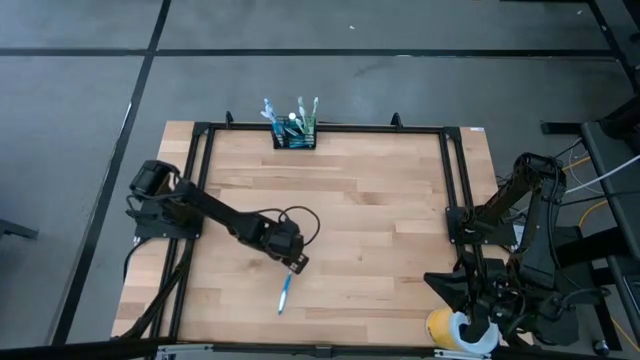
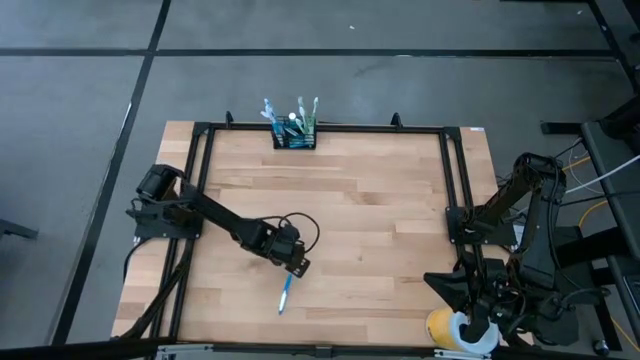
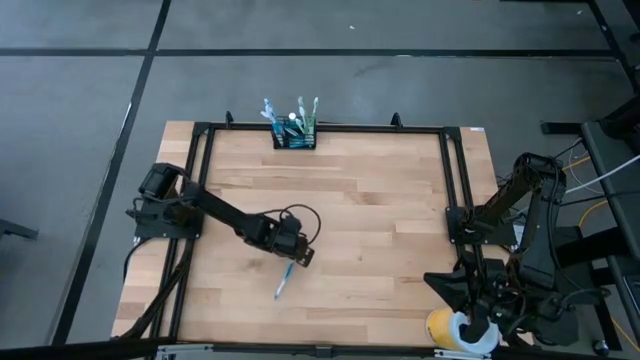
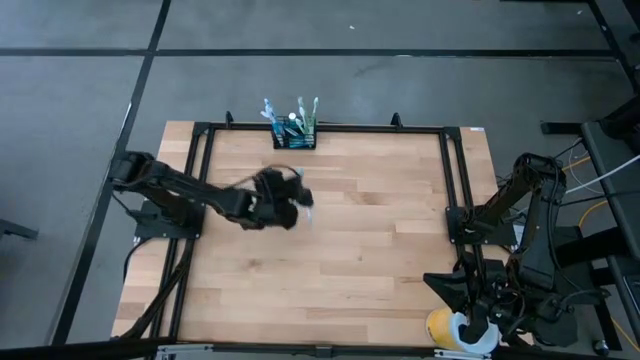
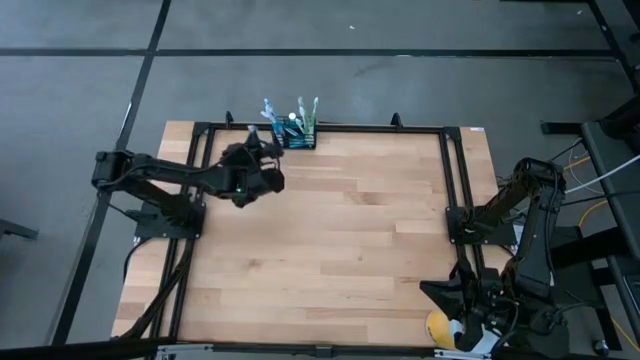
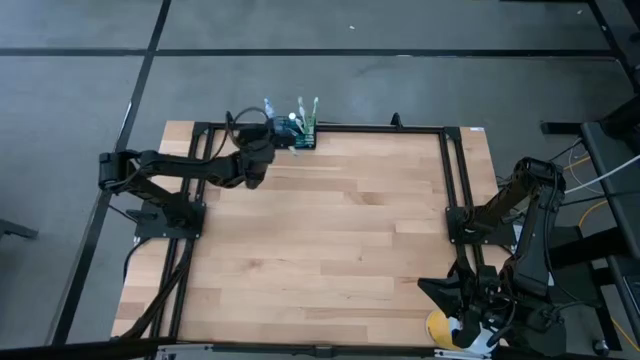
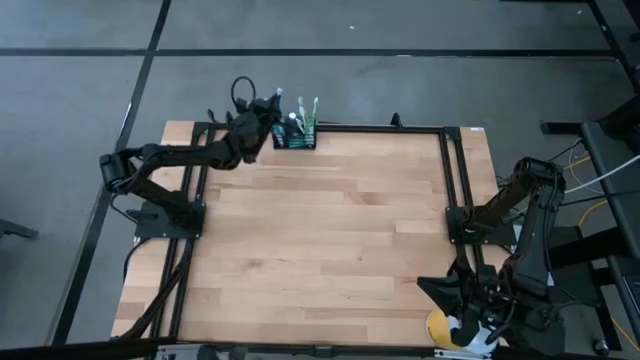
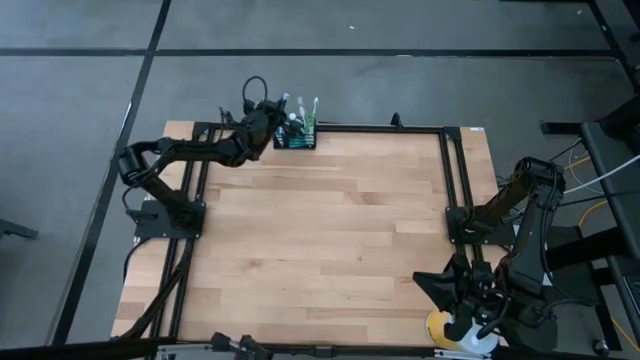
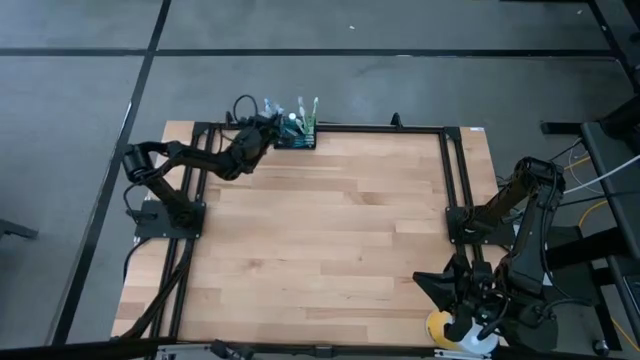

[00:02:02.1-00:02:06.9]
Task: Pick & Place toothbrushing station
Put the blue toothbrush into the black wire organizer

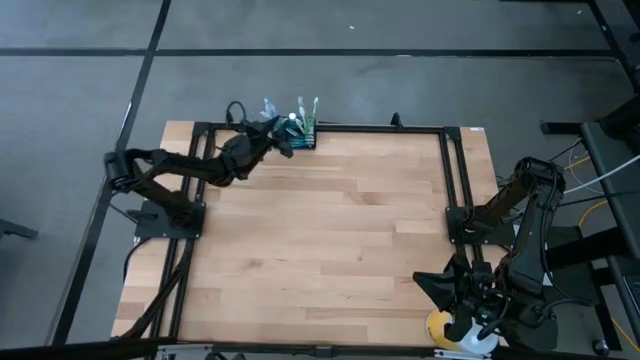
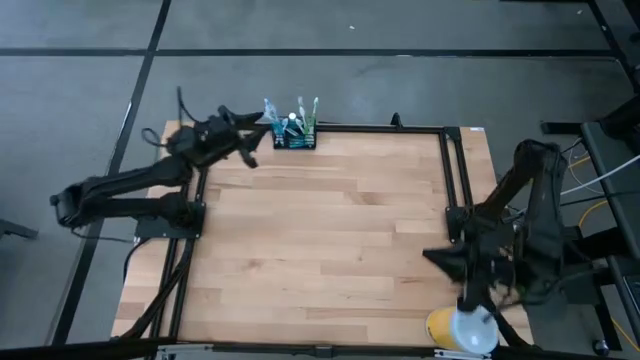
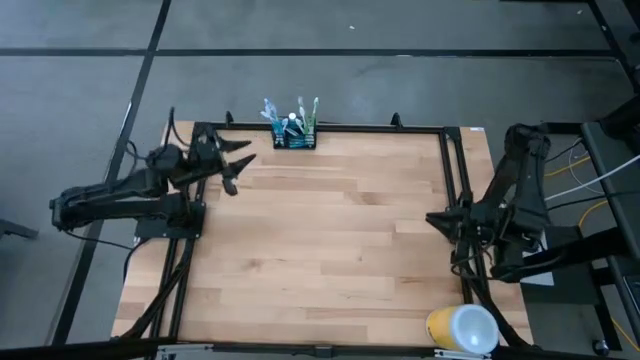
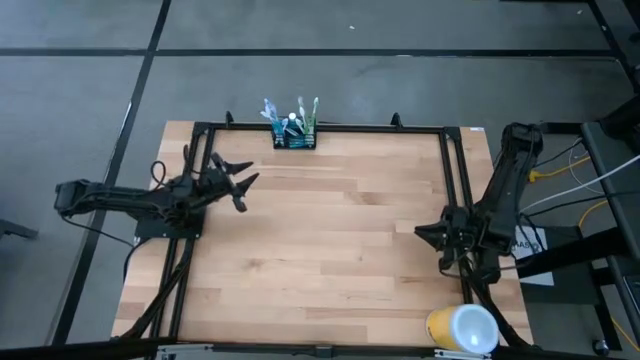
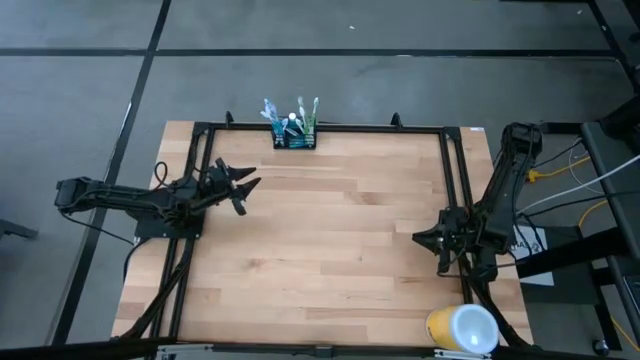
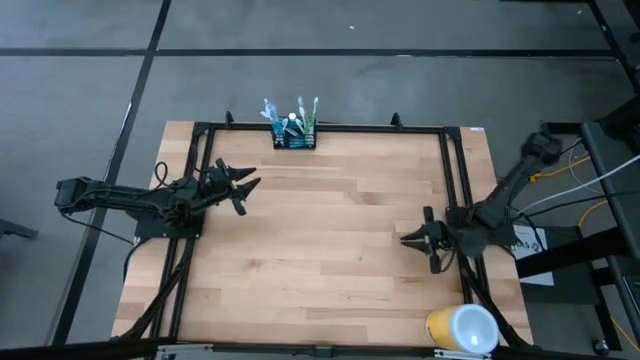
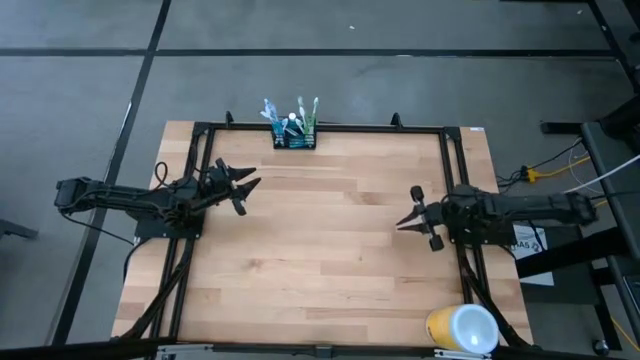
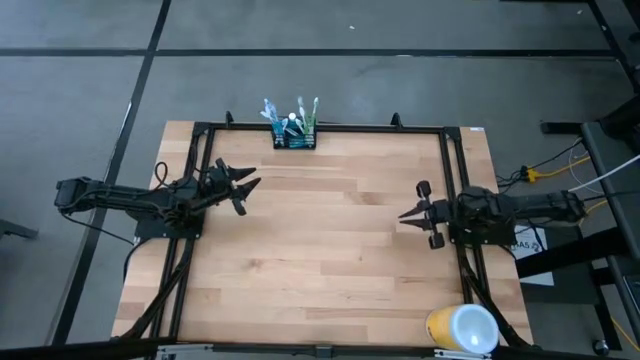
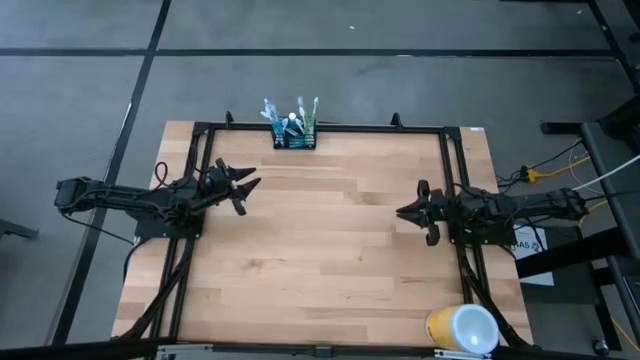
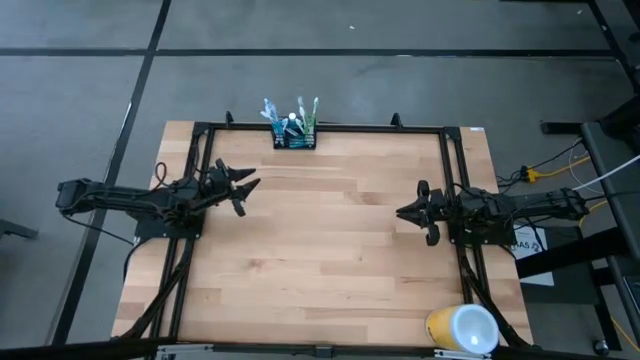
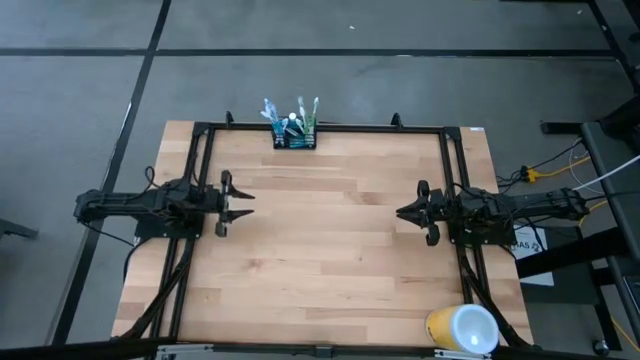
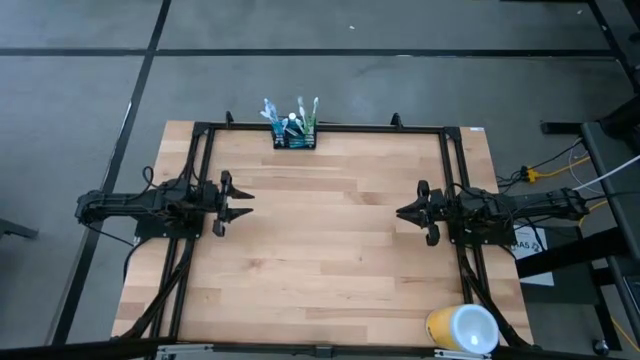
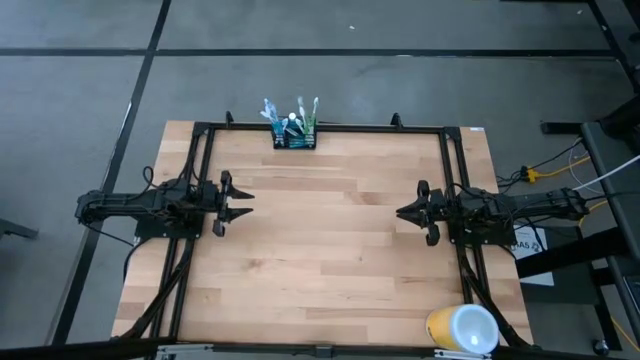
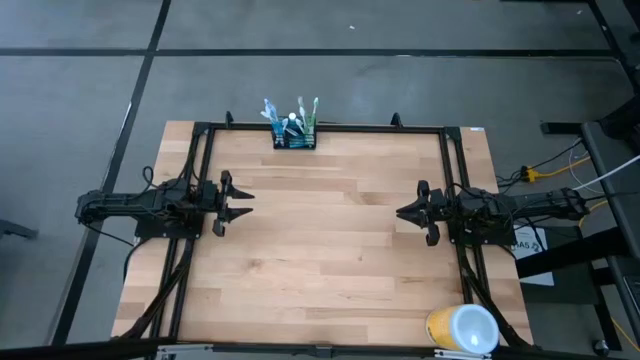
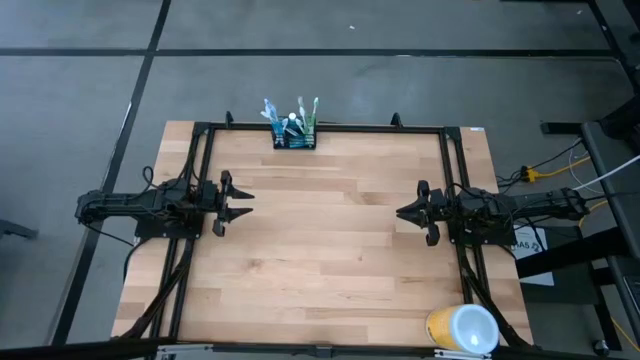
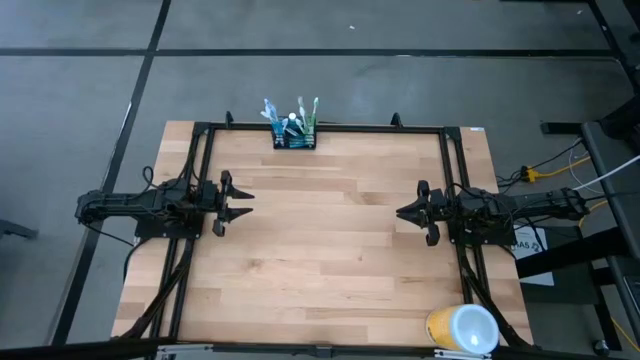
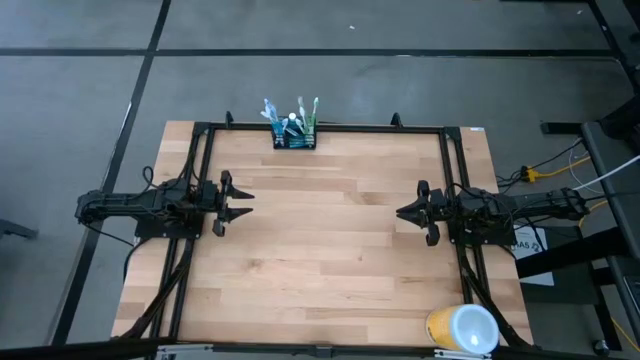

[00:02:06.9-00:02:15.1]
Return to Home Position

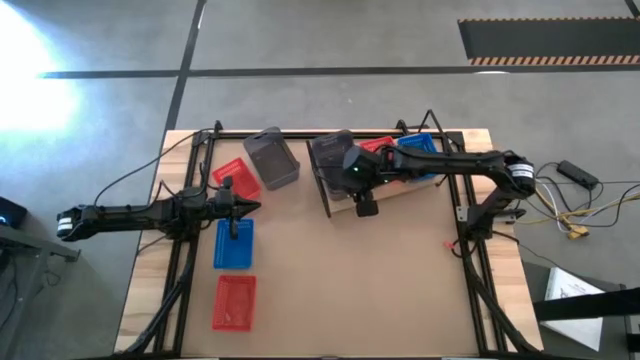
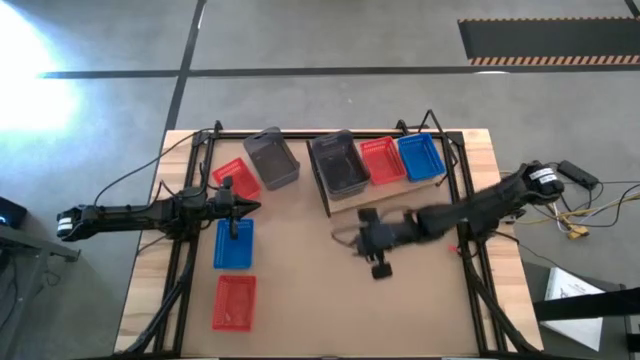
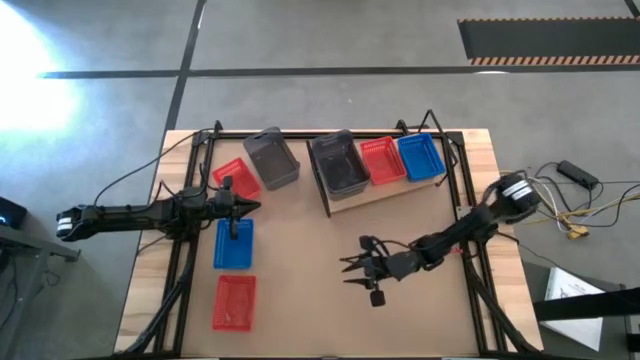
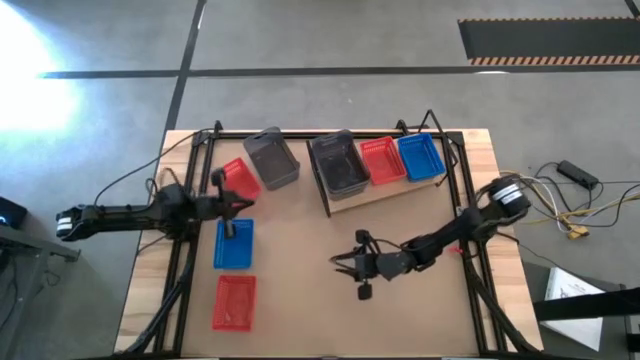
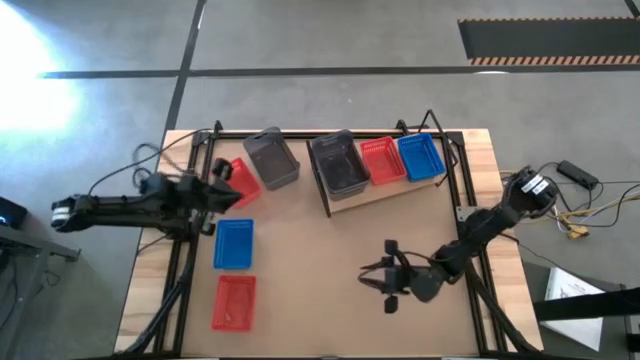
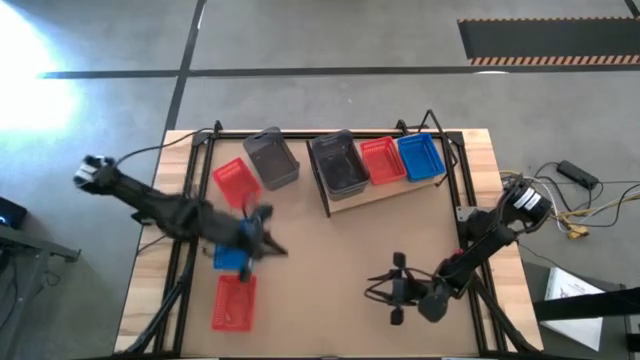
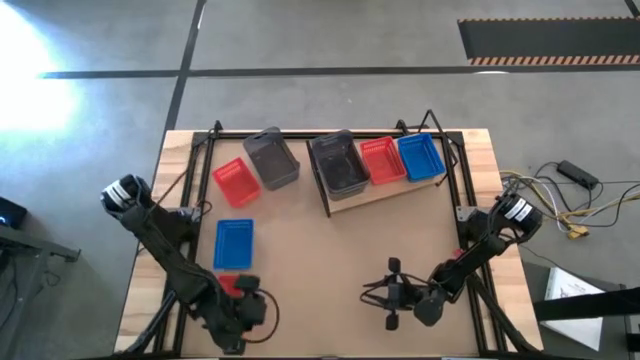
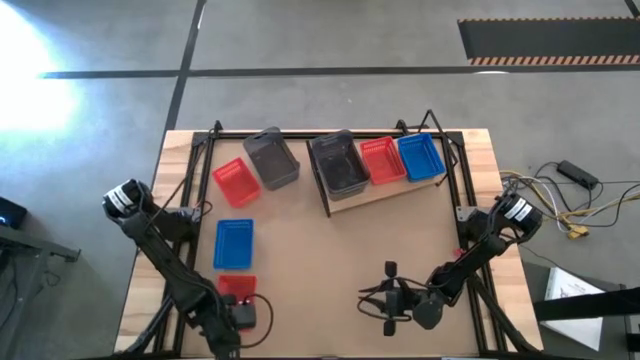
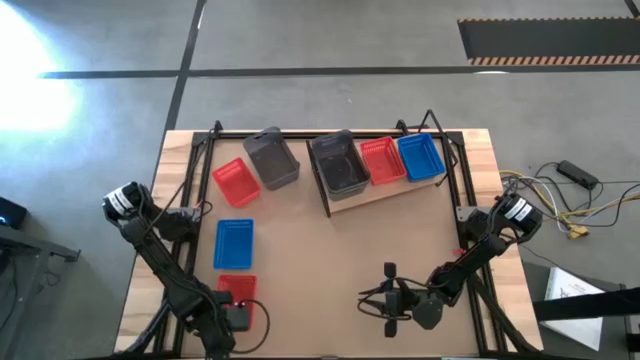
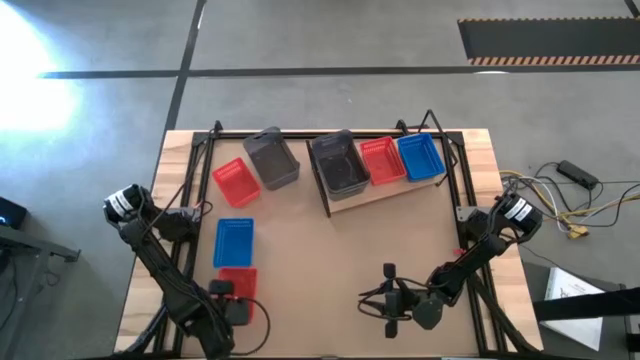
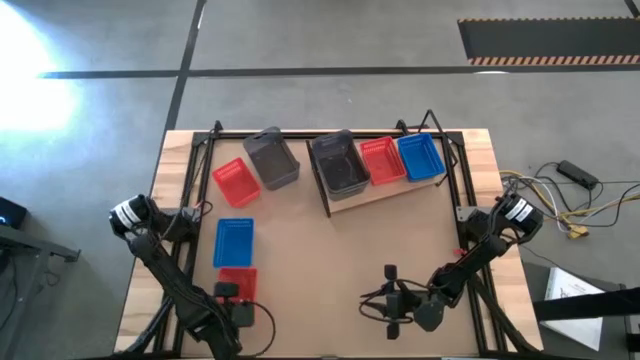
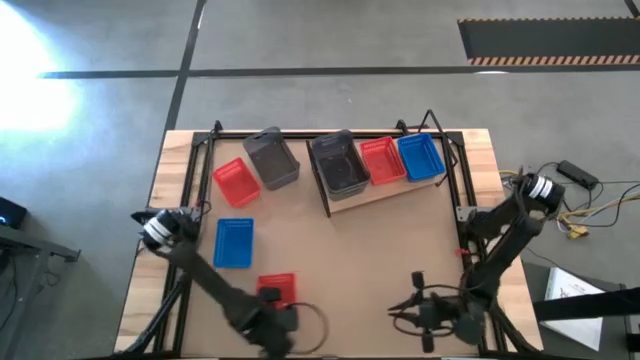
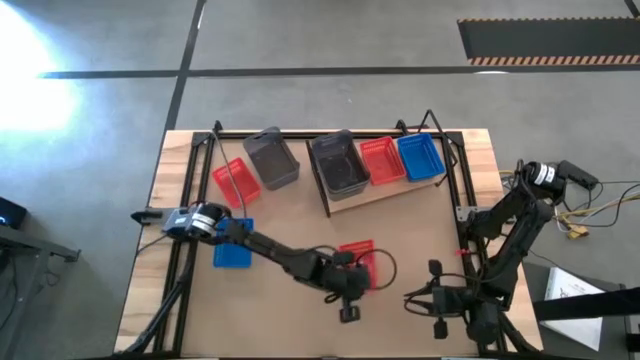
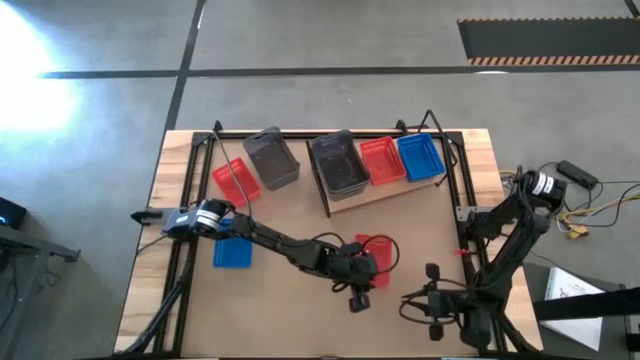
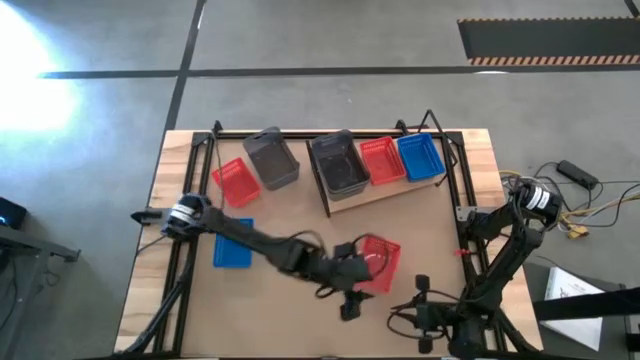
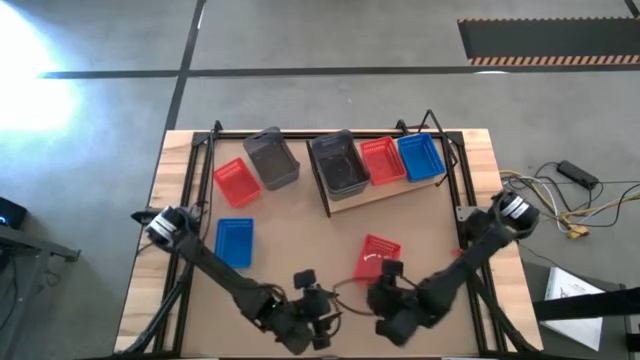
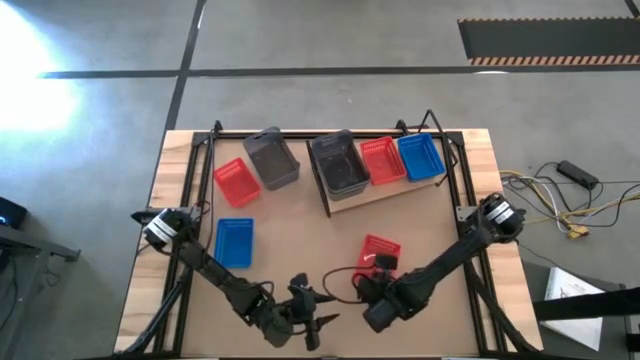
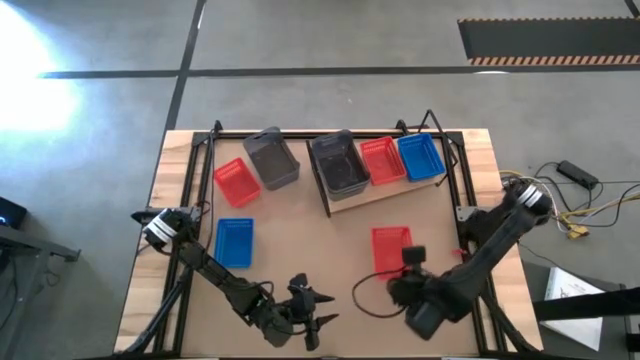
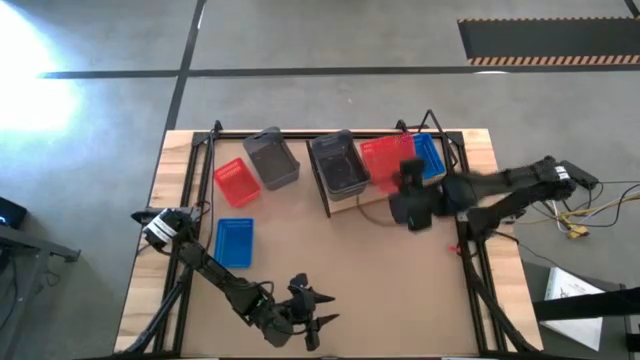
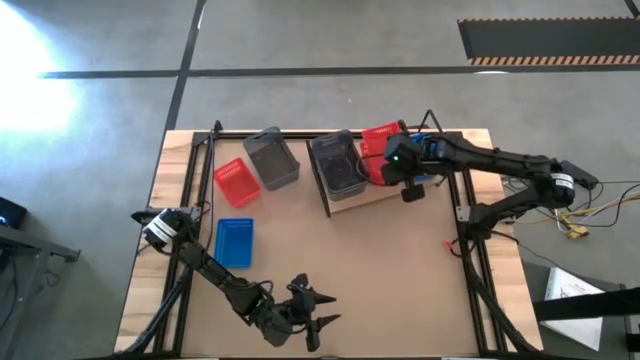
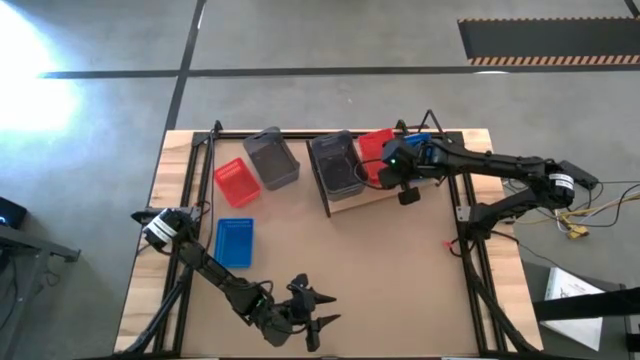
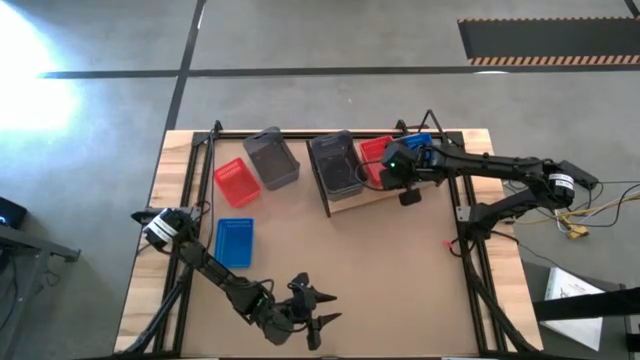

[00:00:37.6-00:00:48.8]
Task: Stack baskets on shelf by color
Stack the bottom red bin on the other red bin on the shelf
